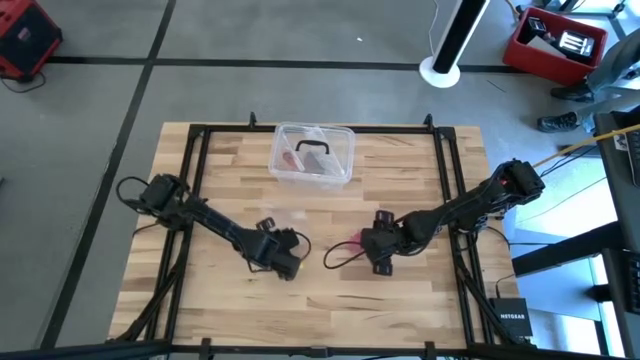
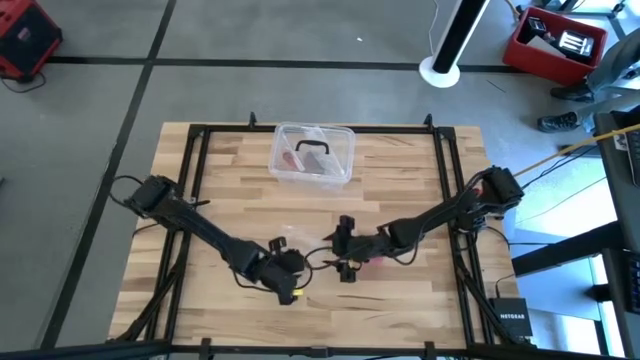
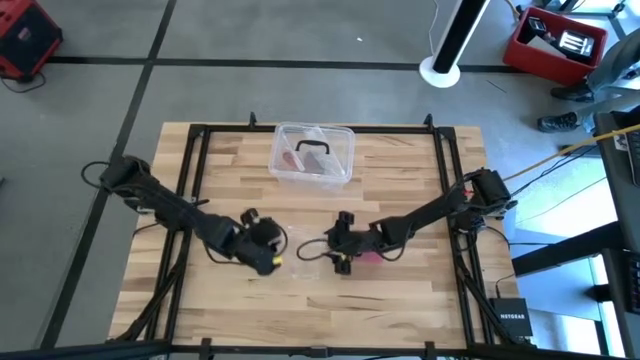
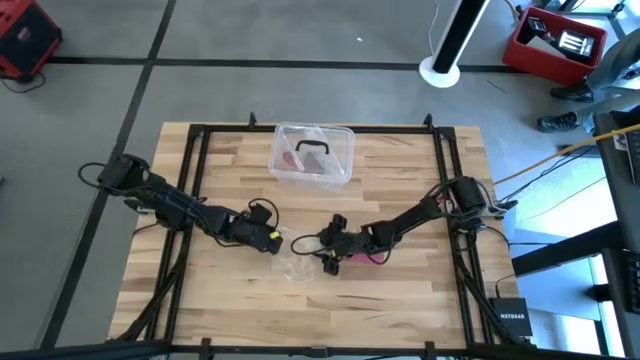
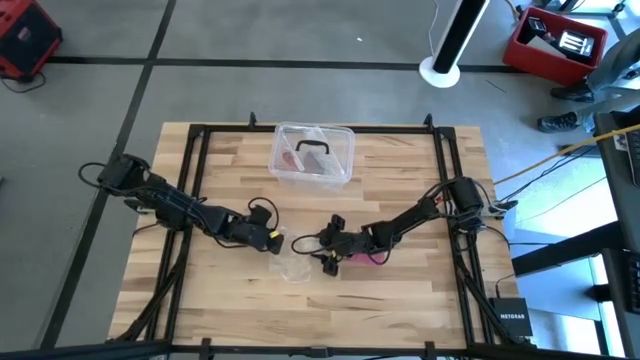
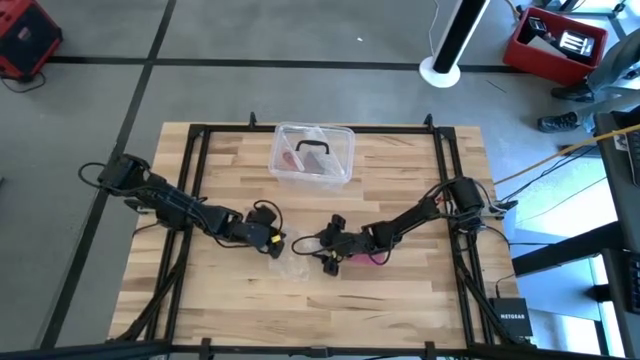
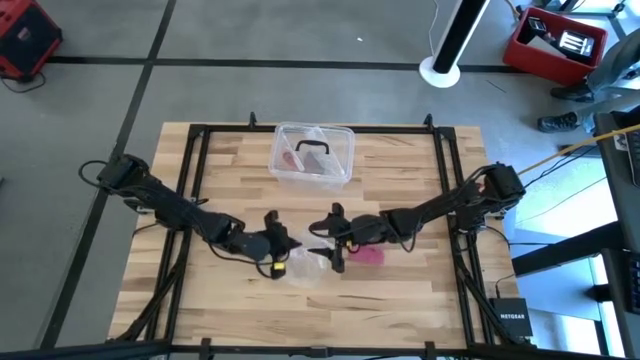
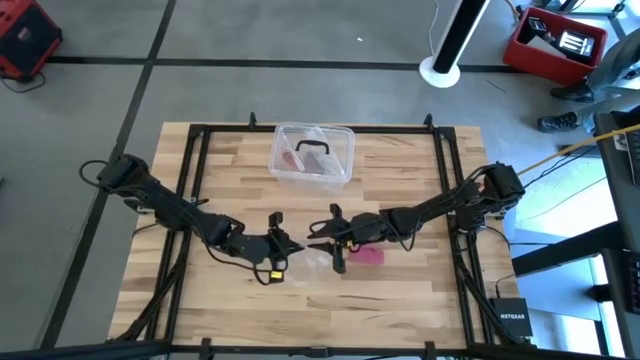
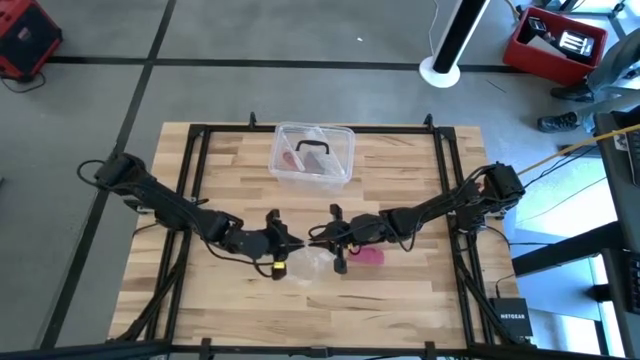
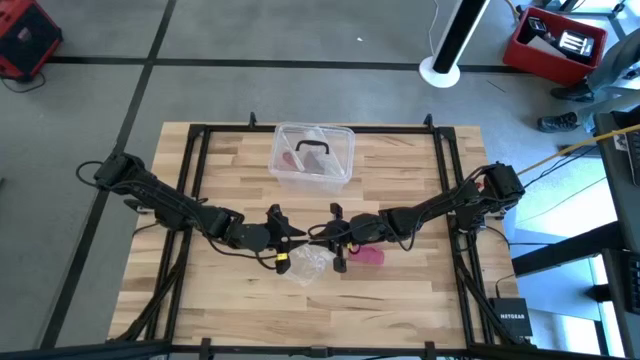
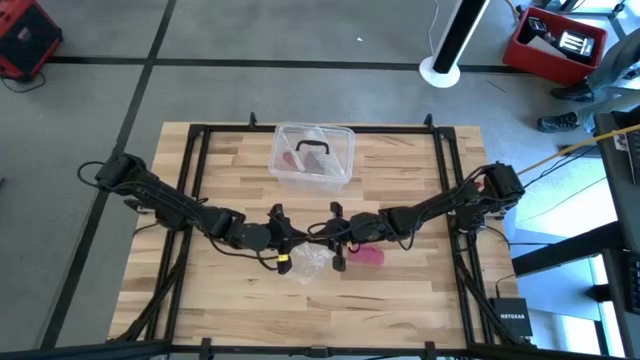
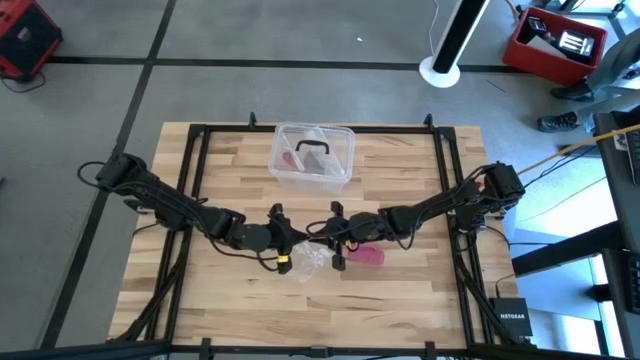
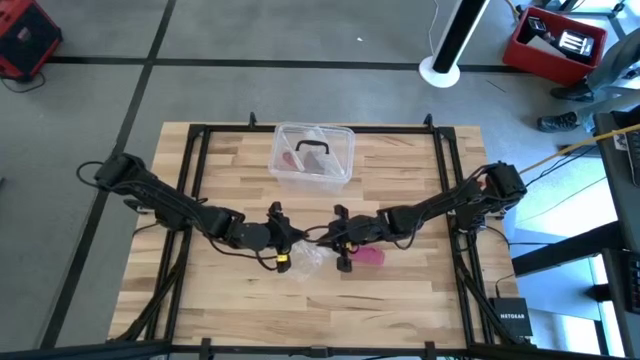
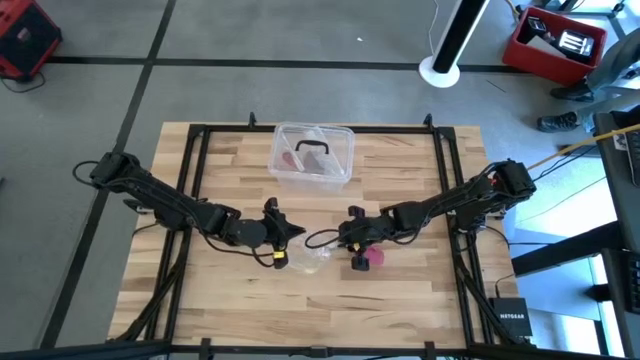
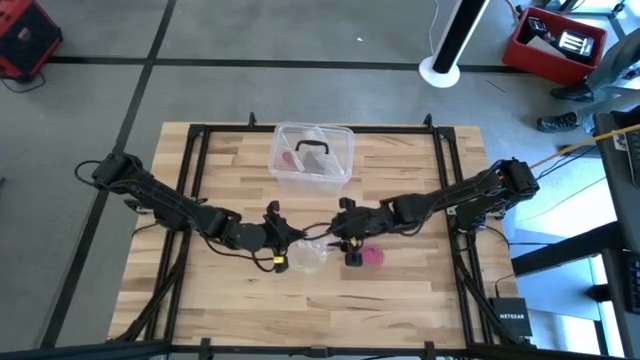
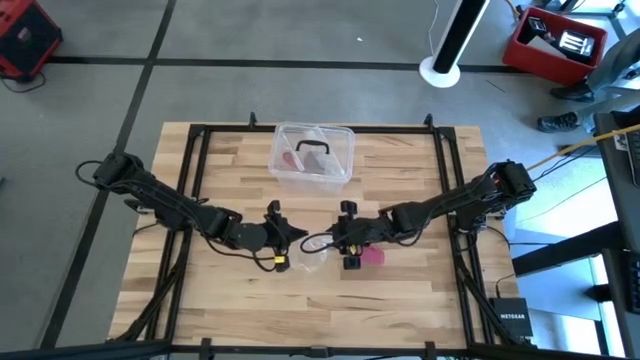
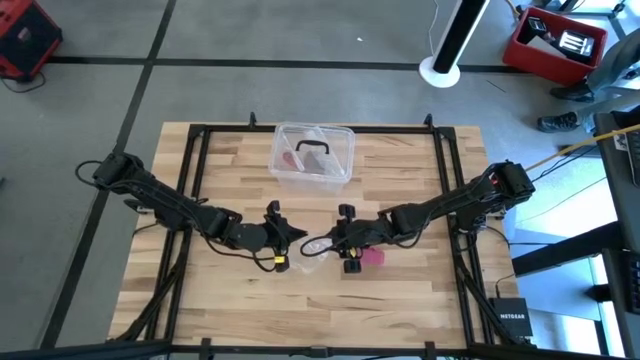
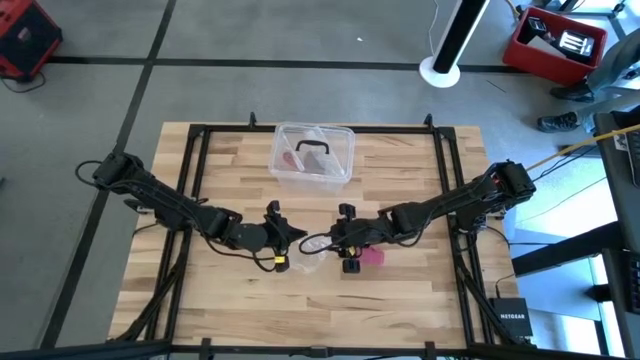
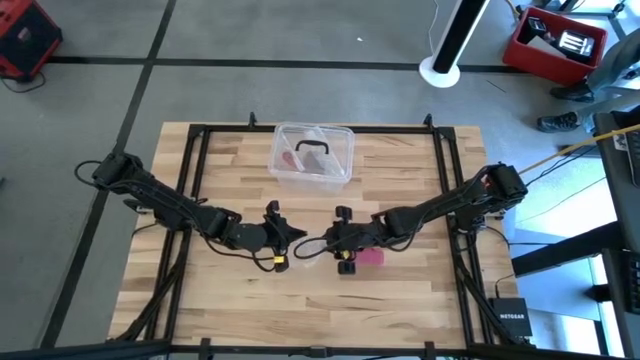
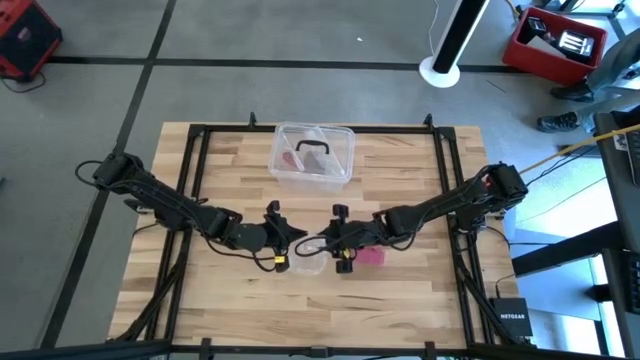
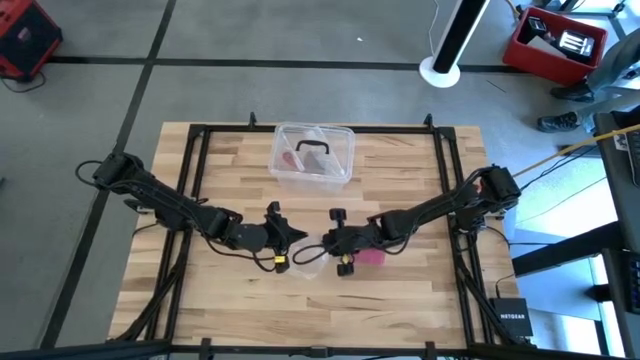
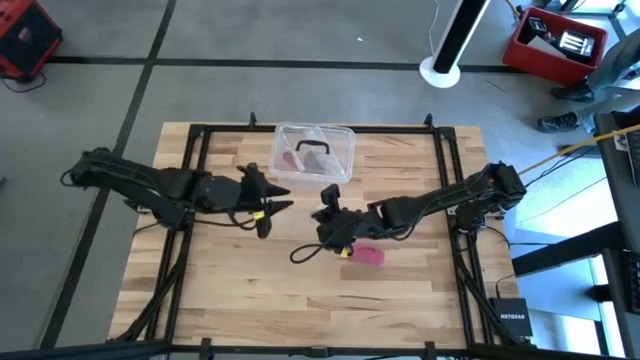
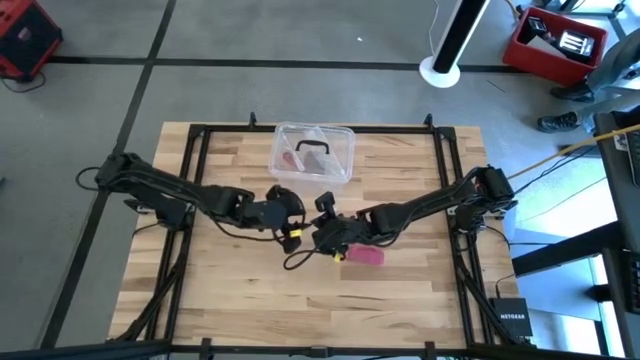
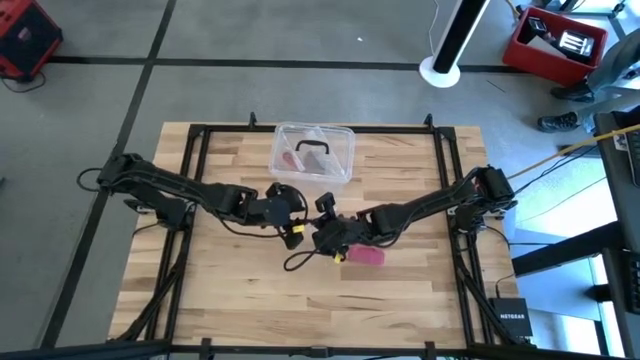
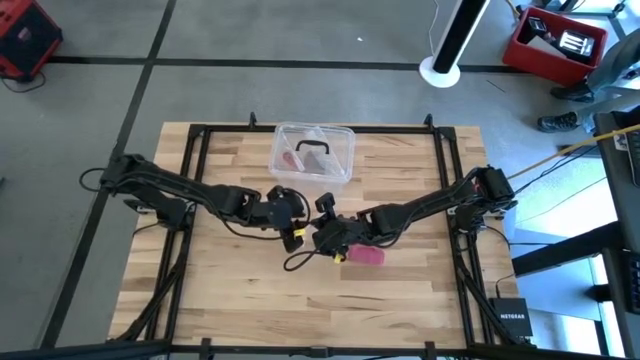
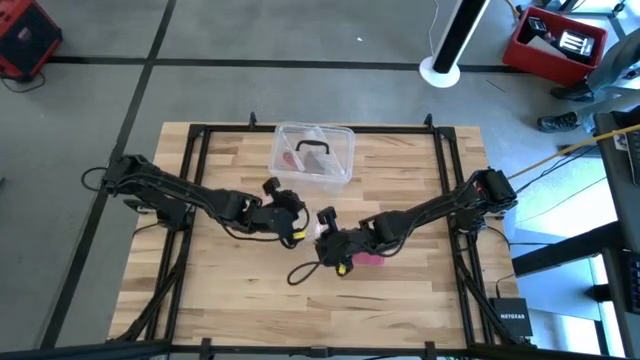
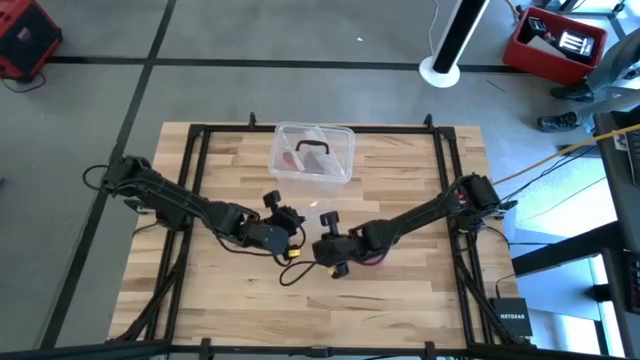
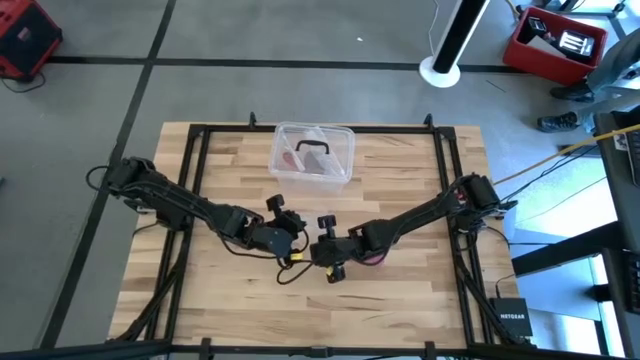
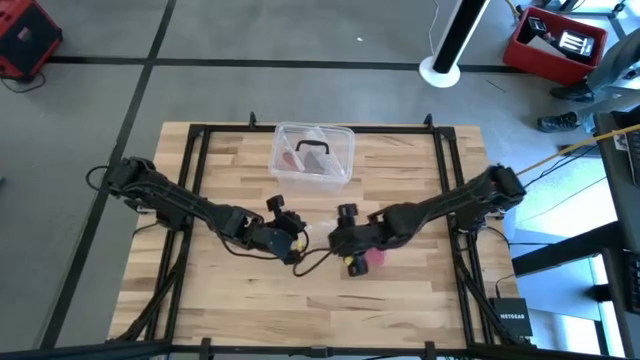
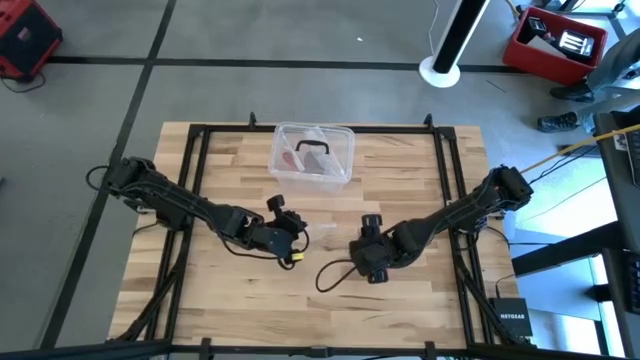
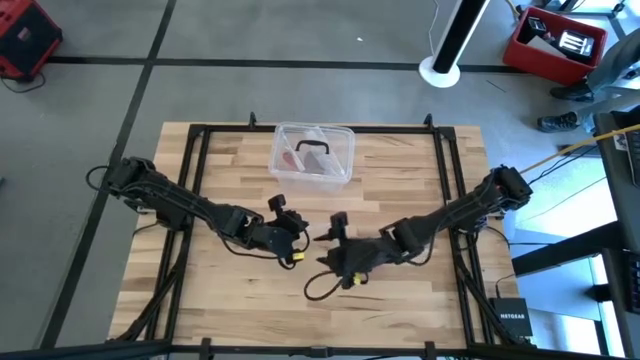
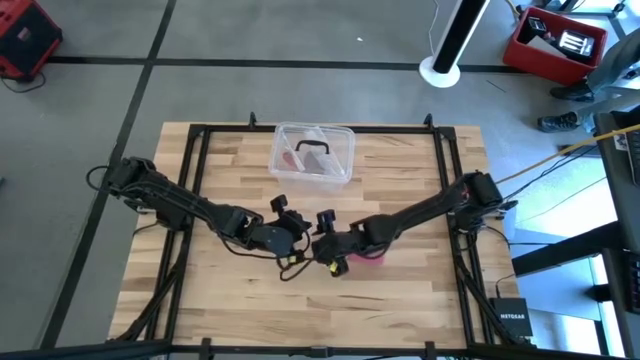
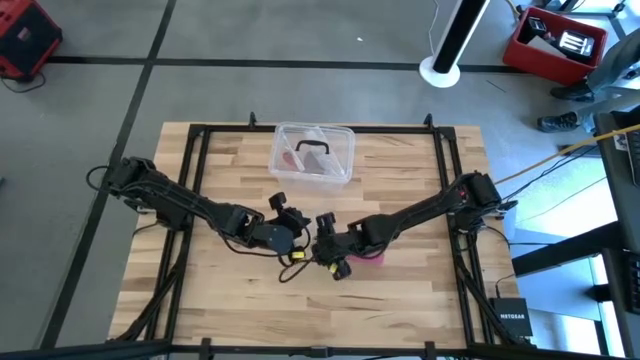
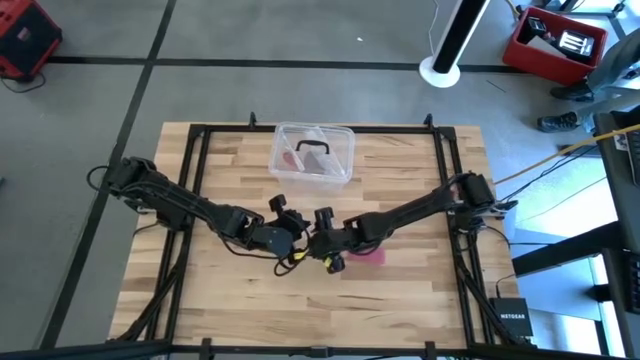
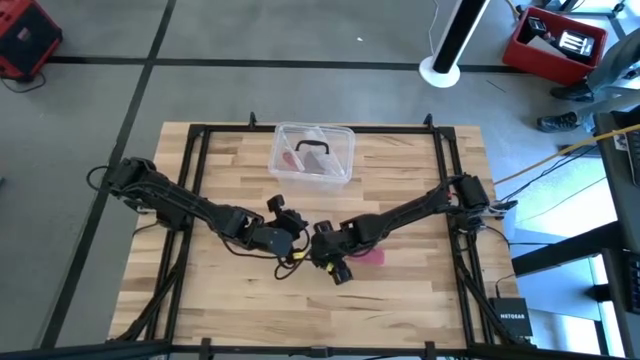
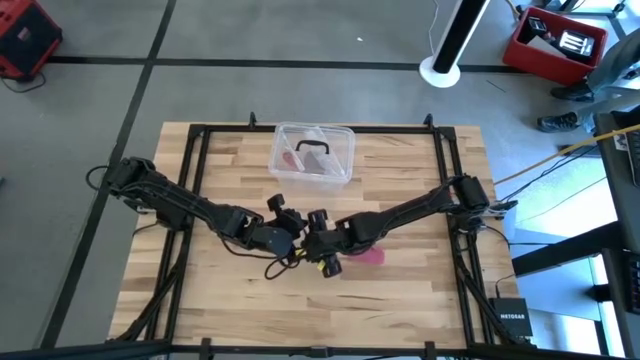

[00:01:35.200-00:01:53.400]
Task: Roll bandage
Prepare the transparent zip bag

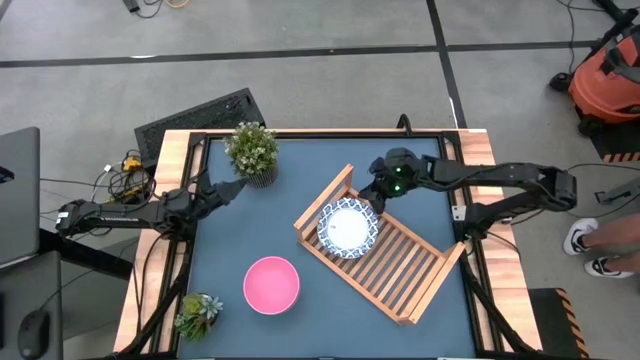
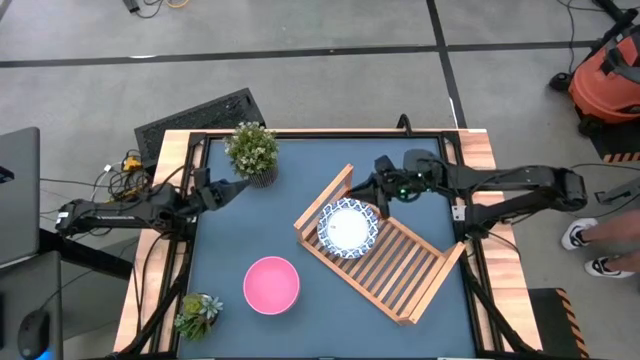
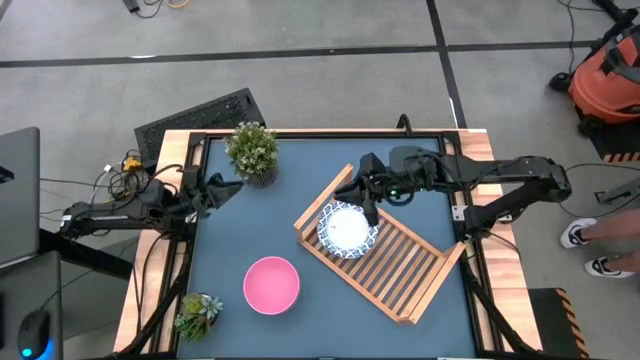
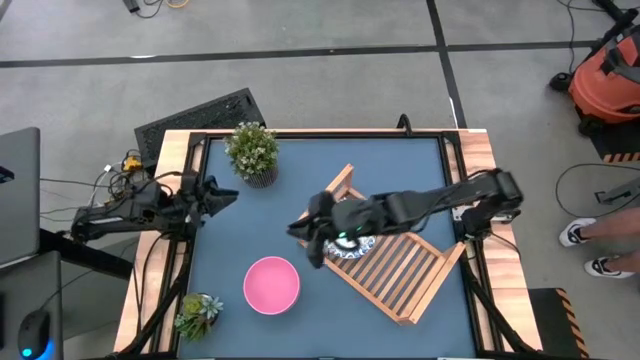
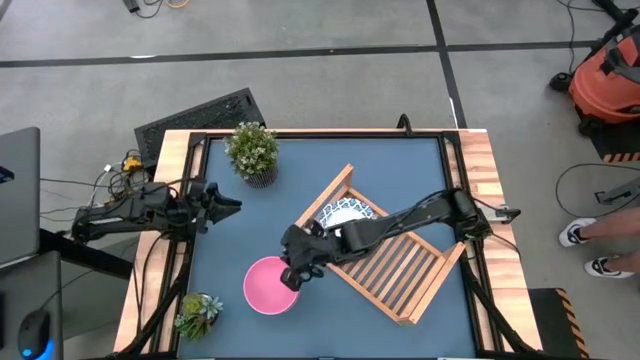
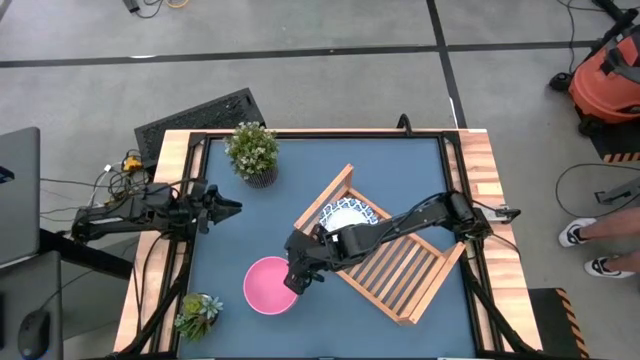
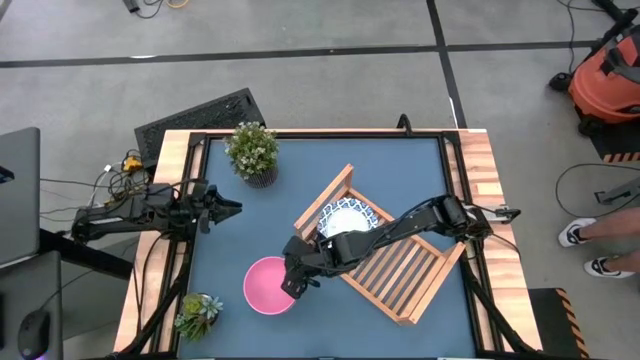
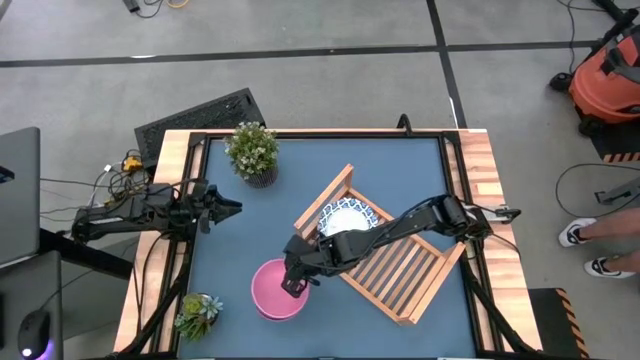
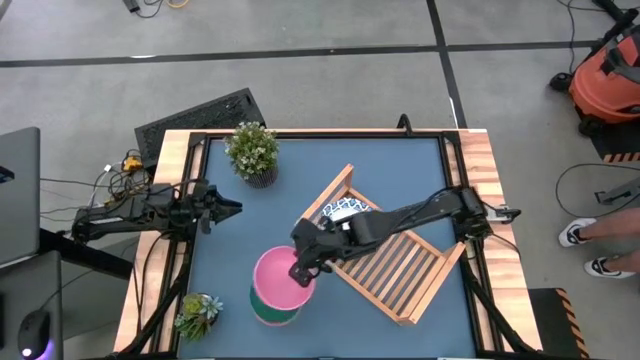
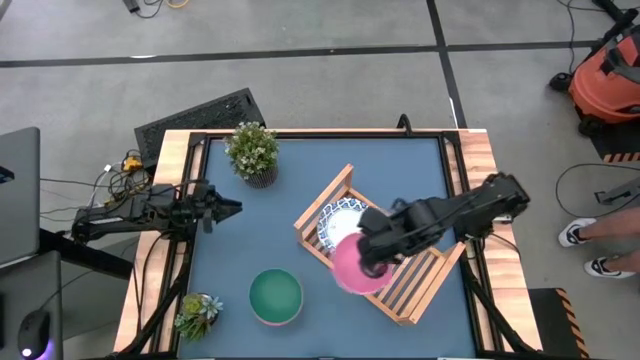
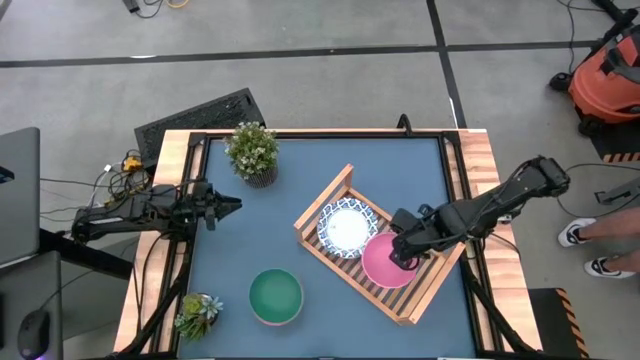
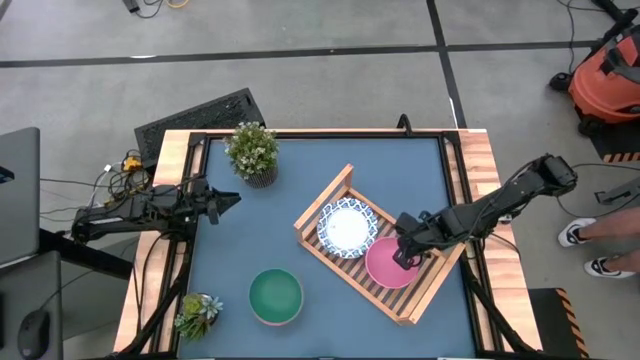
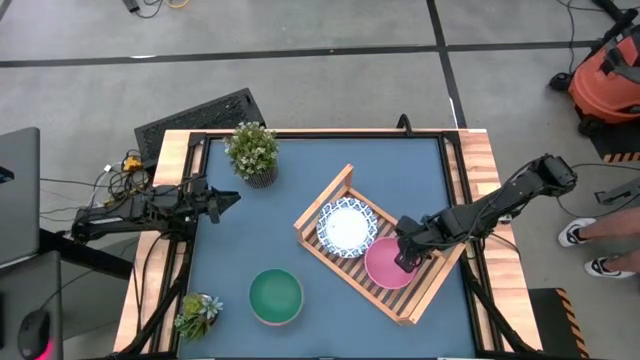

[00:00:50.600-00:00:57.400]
Task: Place and stack bowls onto a shelf
Put the pink bowl on the shelf
